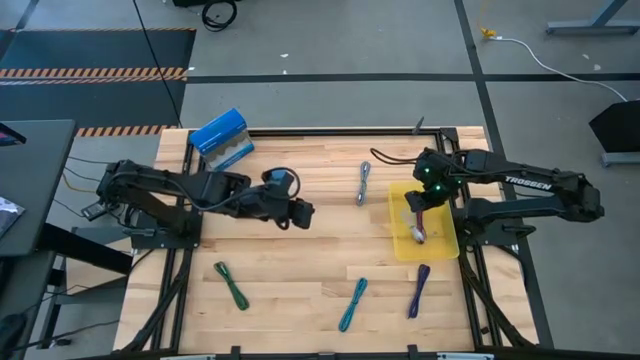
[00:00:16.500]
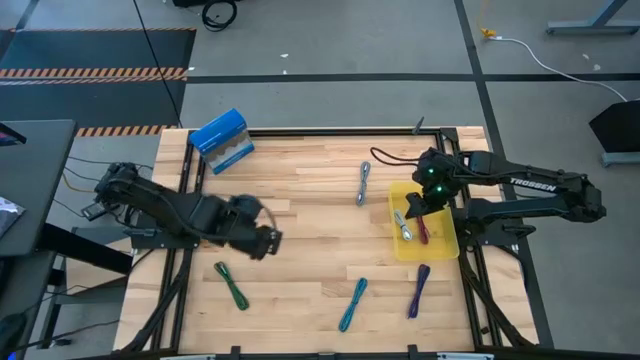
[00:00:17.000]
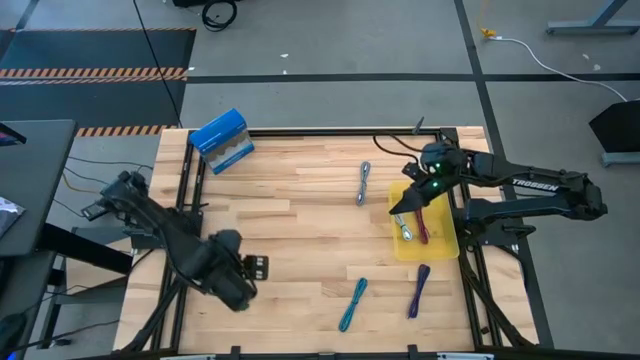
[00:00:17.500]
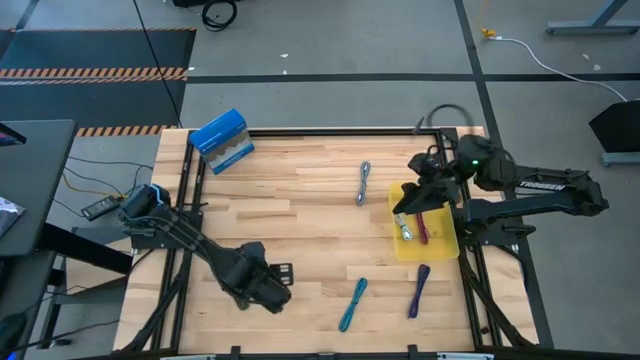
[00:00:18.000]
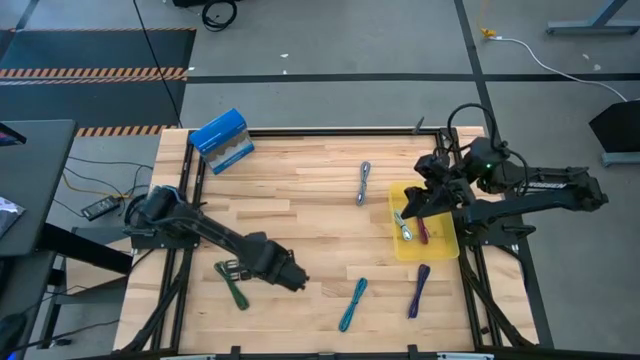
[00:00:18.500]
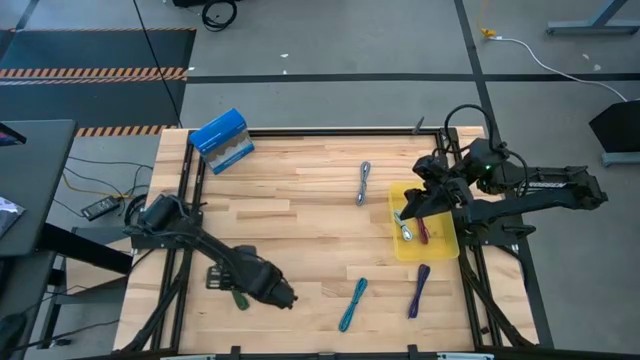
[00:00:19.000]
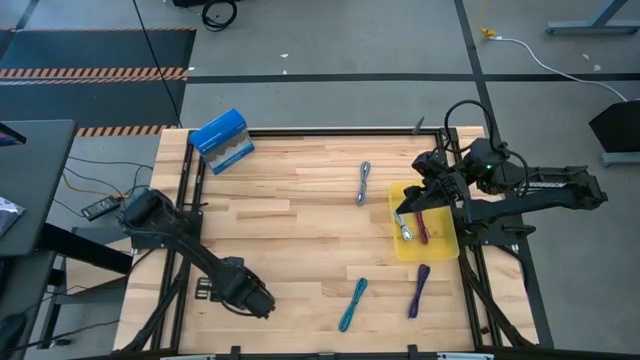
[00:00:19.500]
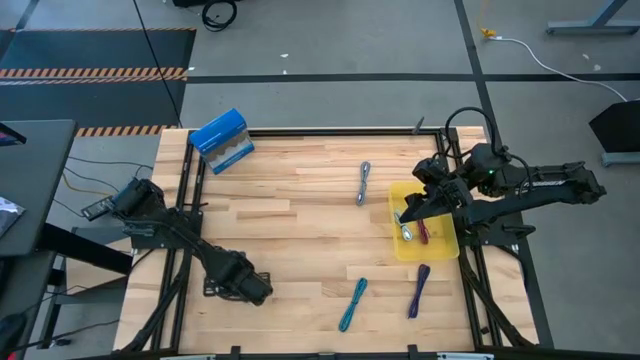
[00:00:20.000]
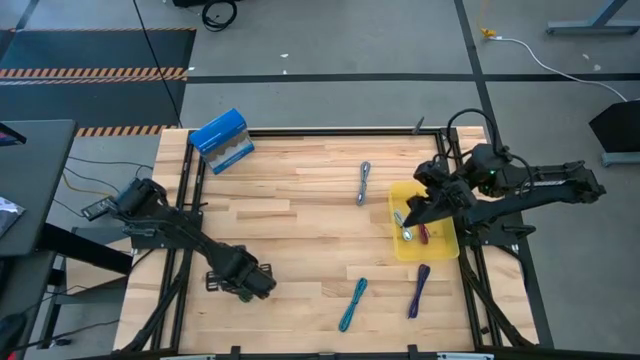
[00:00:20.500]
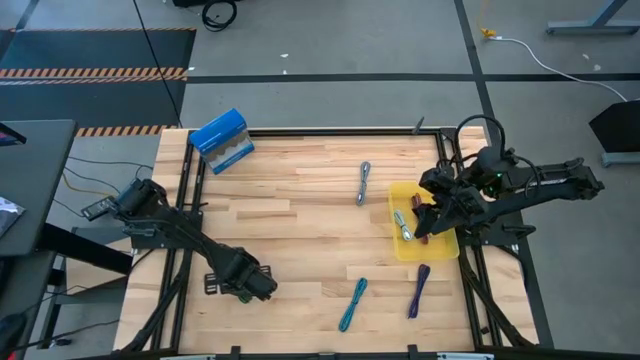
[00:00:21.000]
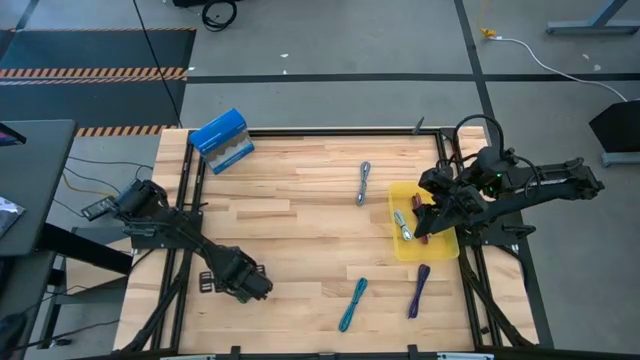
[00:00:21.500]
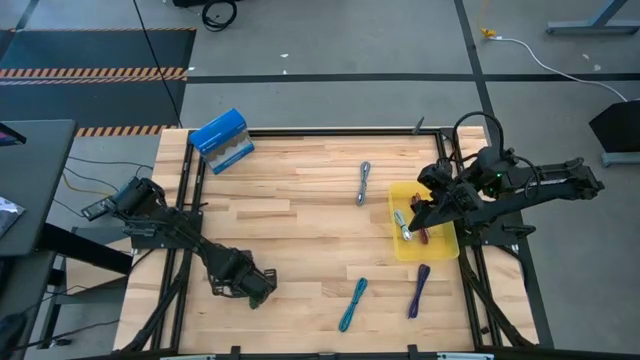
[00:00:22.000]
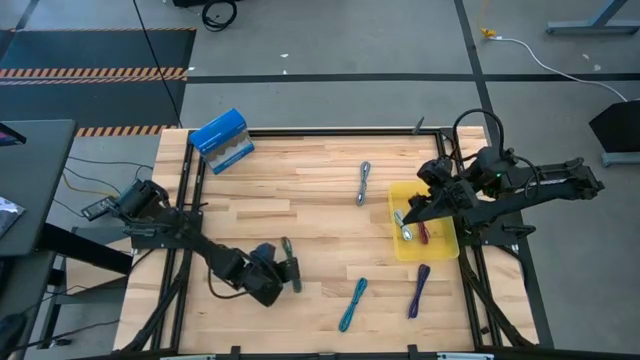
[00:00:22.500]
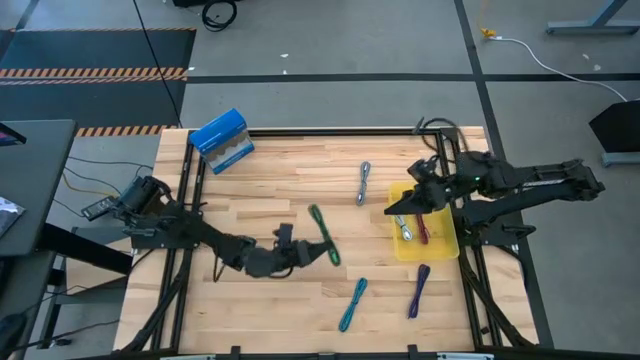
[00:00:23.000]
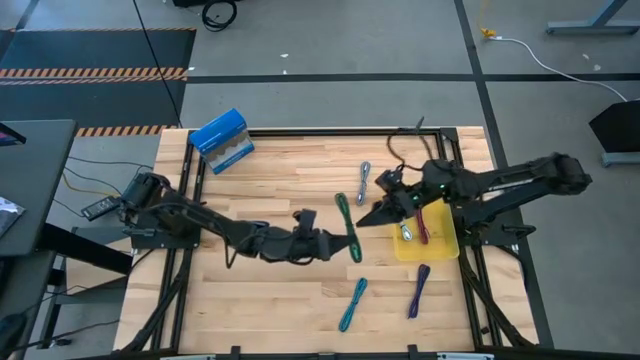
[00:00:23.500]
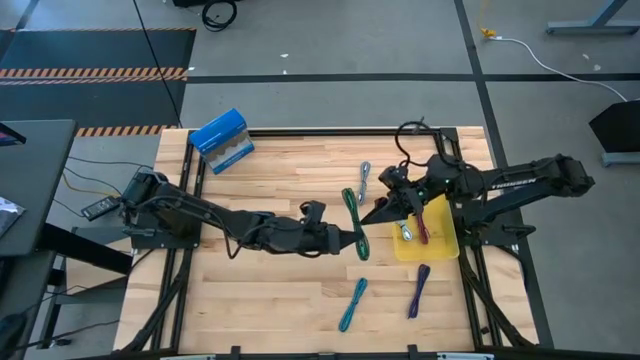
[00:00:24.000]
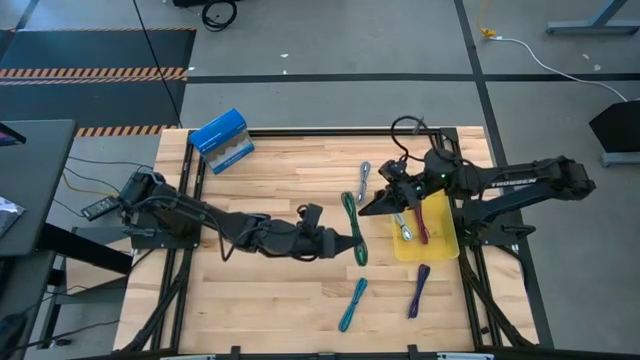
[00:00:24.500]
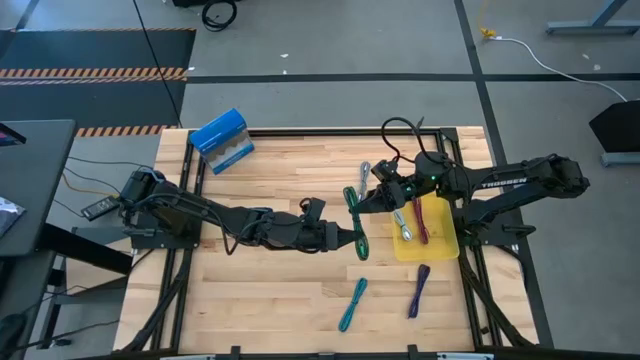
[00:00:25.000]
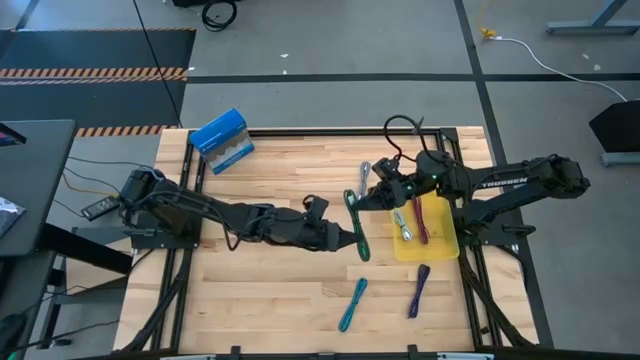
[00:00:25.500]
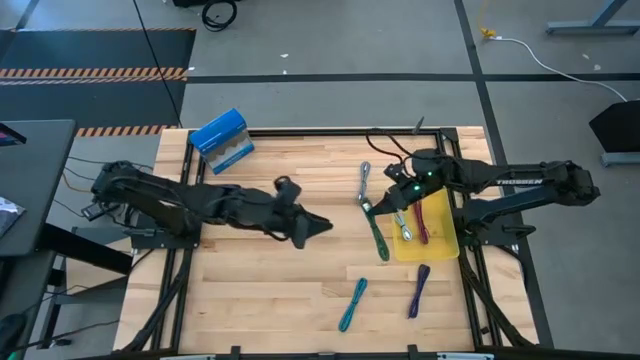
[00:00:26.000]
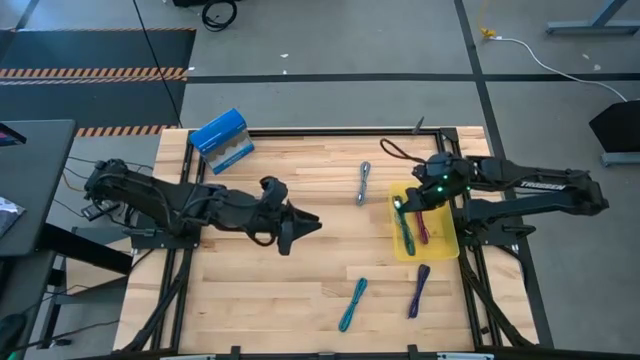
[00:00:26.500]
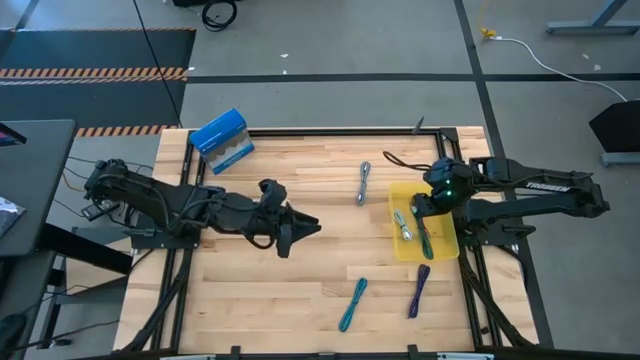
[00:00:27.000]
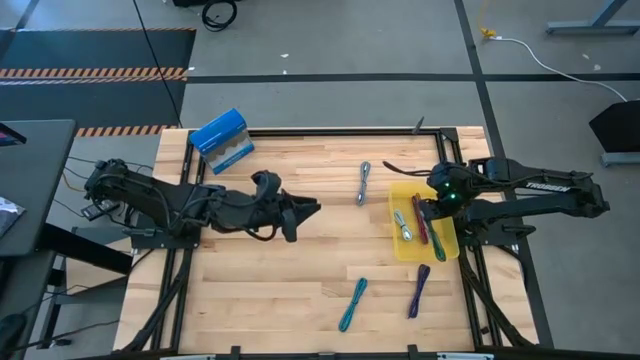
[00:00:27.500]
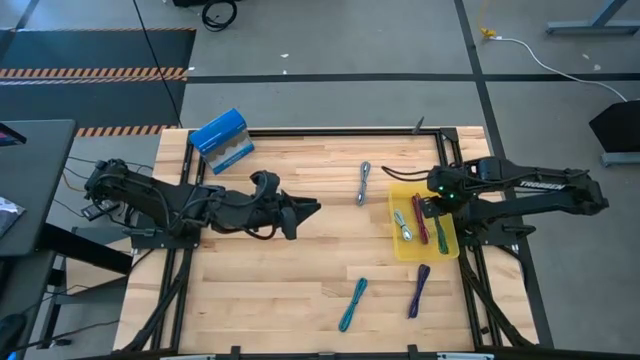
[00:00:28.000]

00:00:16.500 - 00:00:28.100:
Task: Pick and place USB-C Cables
Put the green USB cable into the yellow container

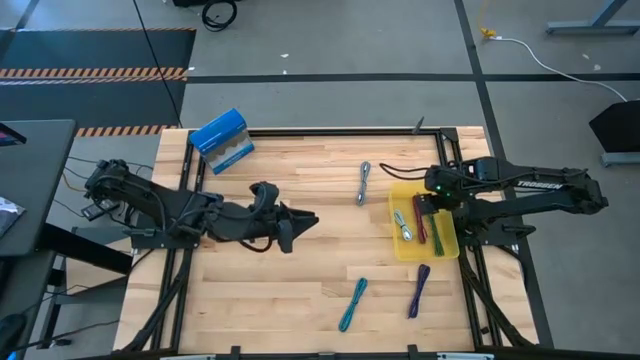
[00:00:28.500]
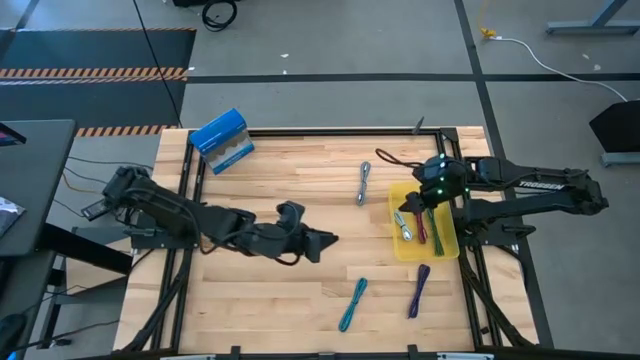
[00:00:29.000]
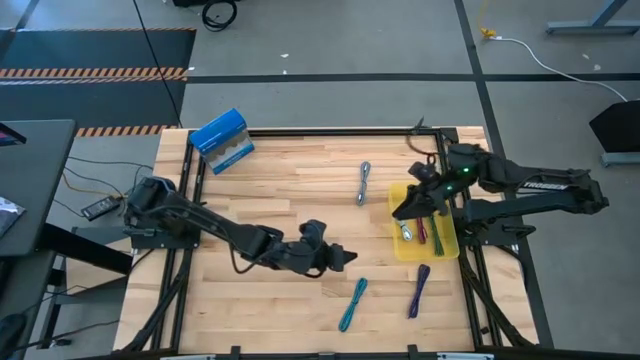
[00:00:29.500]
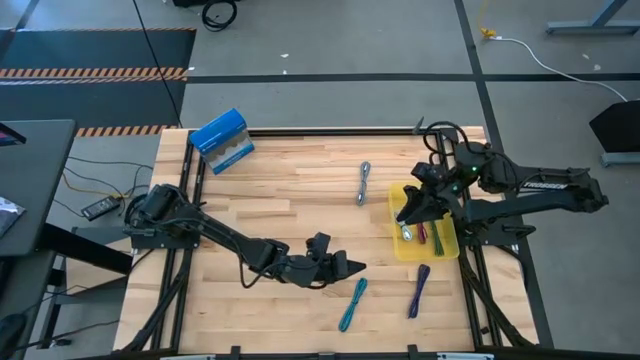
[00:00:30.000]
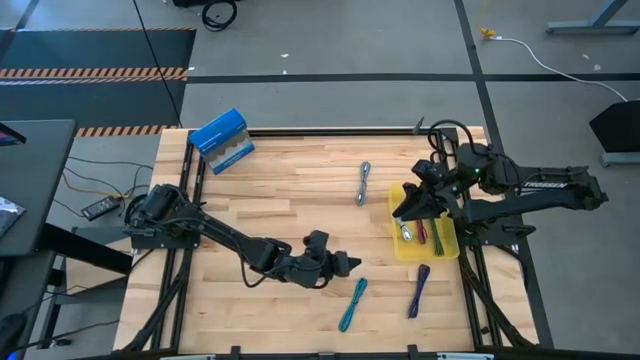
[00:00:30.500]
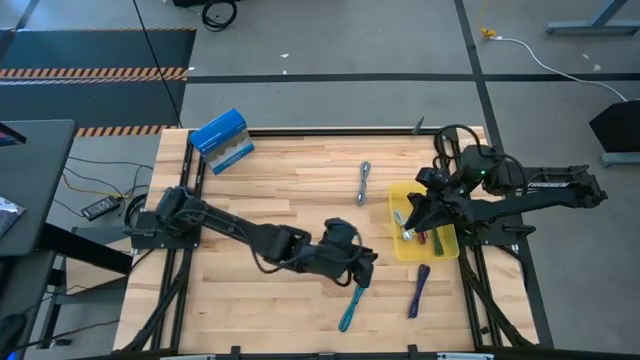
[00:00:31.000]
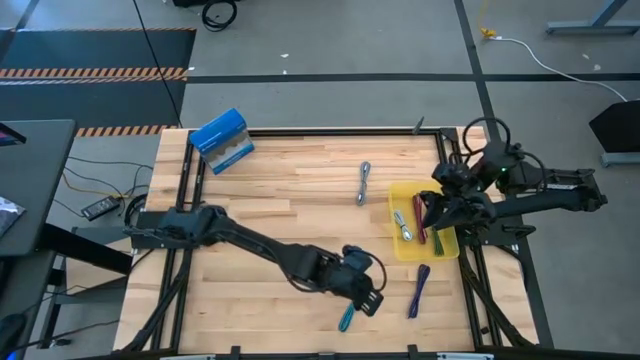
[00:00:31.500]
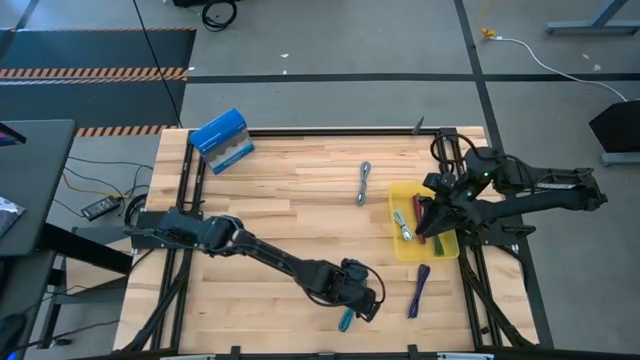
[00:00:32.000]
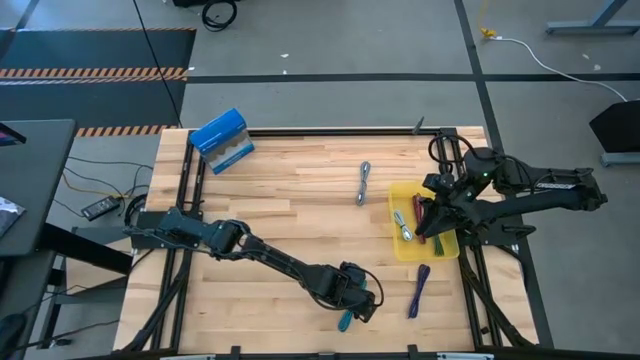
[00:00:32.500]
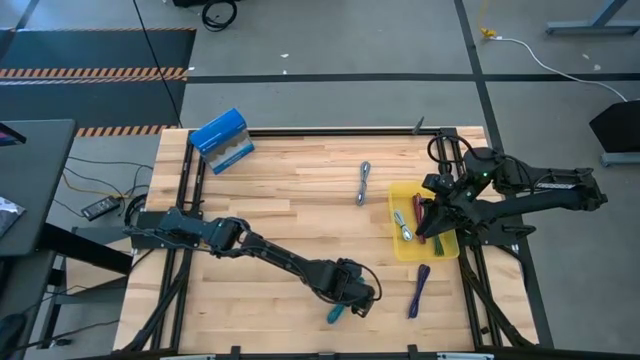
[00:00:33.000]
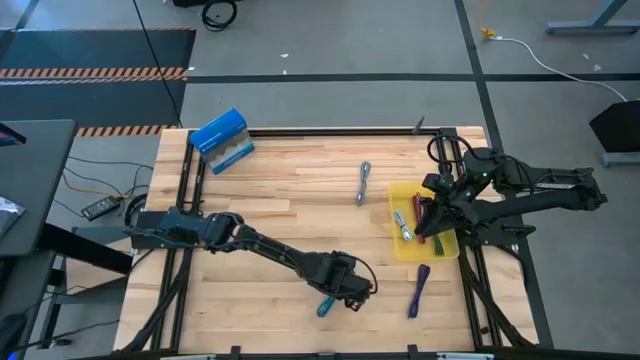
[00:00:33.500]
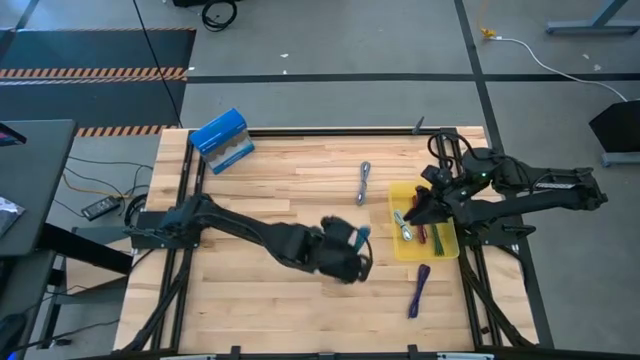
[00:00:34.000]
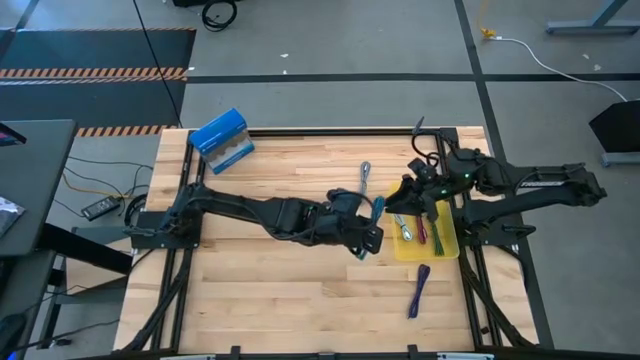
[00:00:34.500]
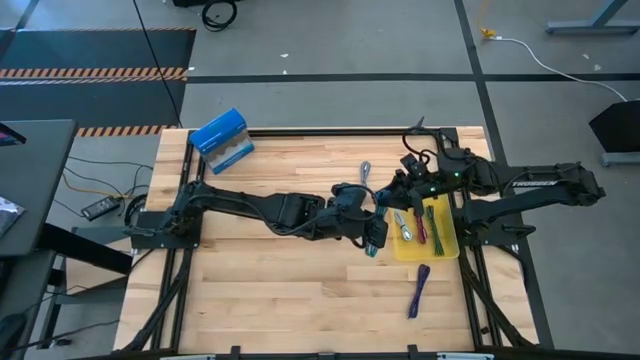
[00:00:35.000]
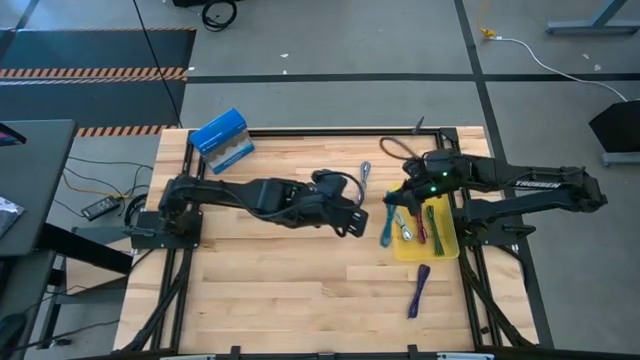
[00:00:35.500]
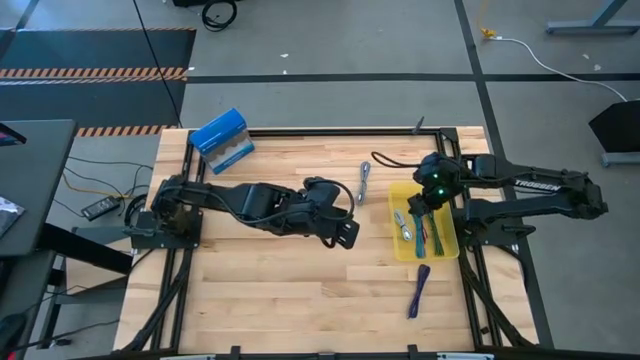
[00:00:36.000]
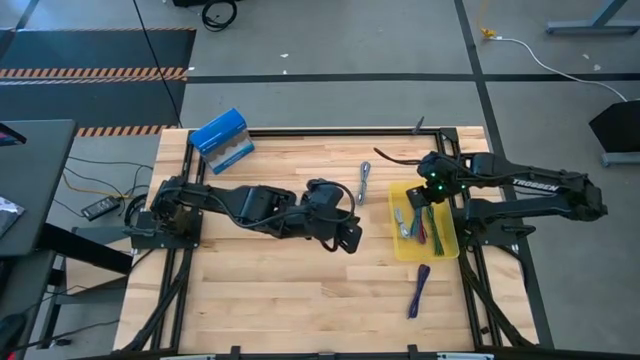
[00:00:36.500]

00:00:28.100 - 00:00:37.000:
Put the light blue USB cable into the yellow container
